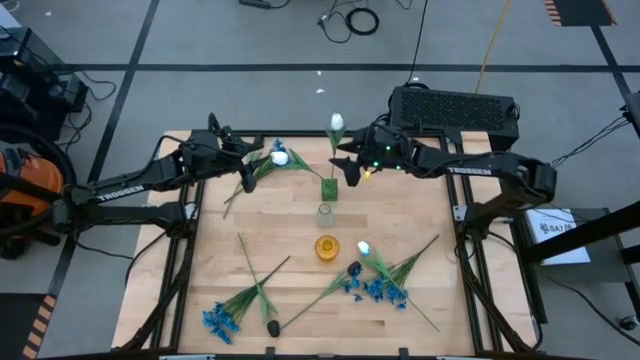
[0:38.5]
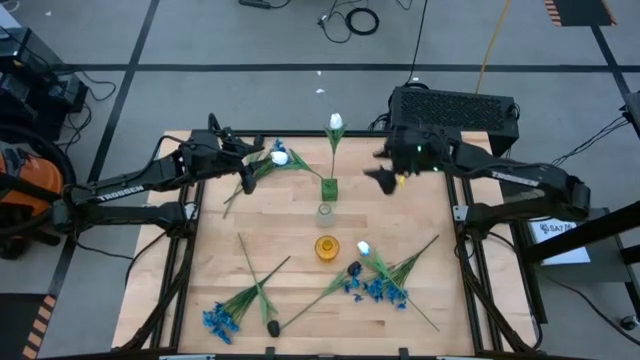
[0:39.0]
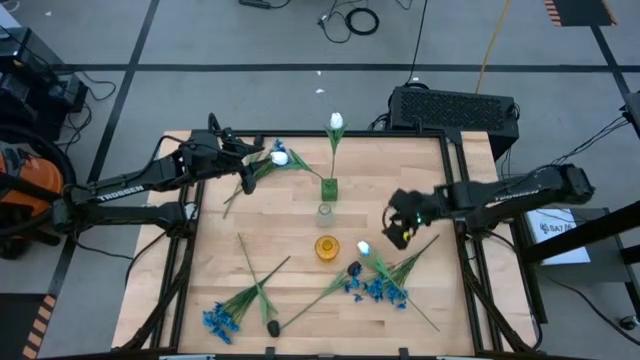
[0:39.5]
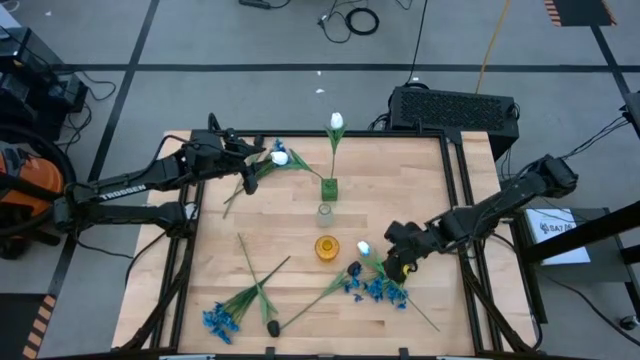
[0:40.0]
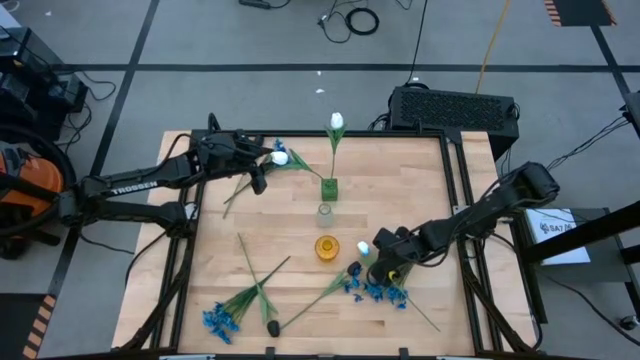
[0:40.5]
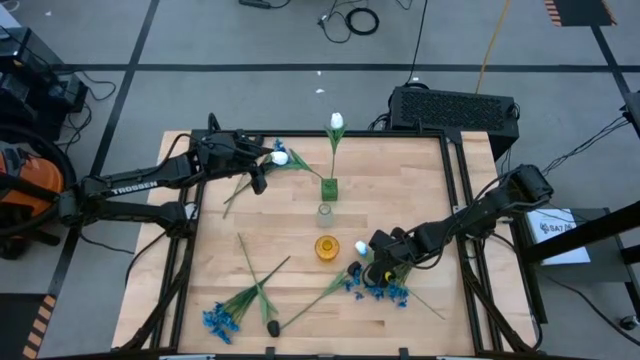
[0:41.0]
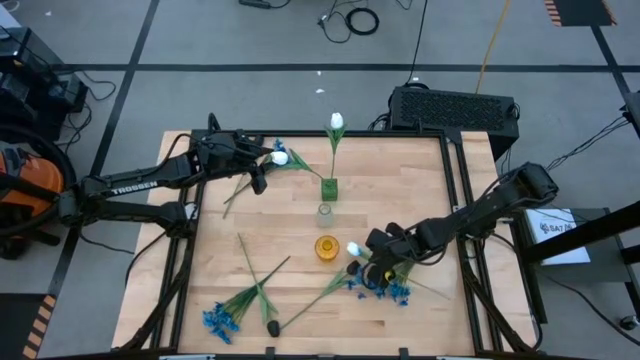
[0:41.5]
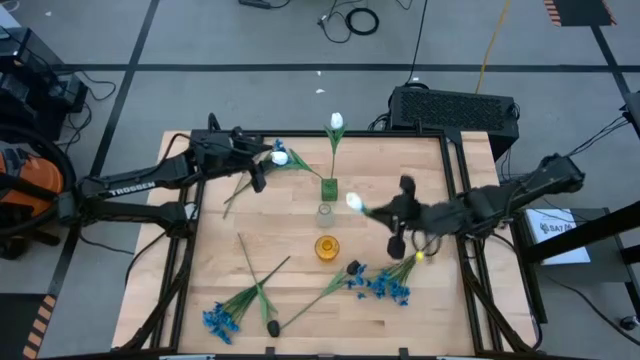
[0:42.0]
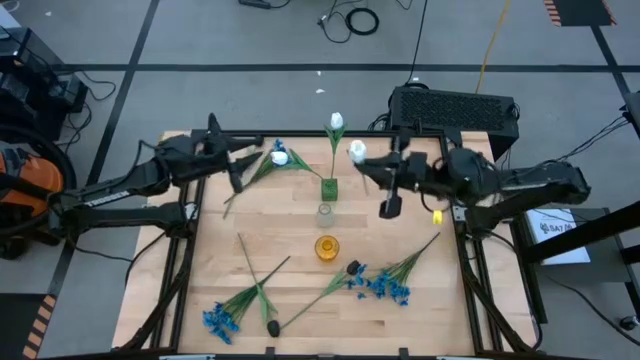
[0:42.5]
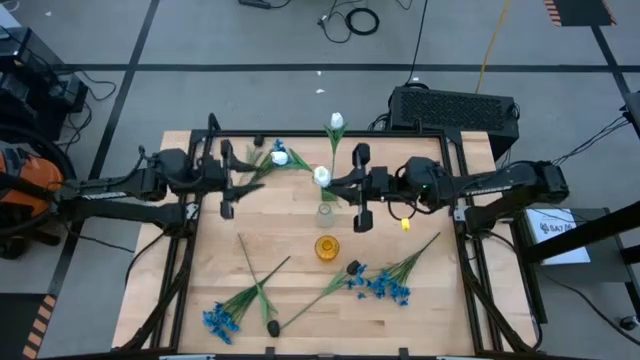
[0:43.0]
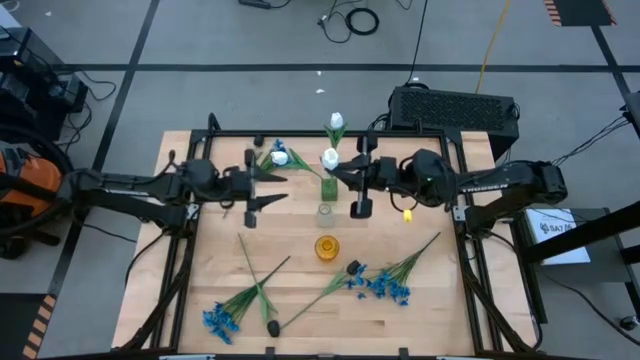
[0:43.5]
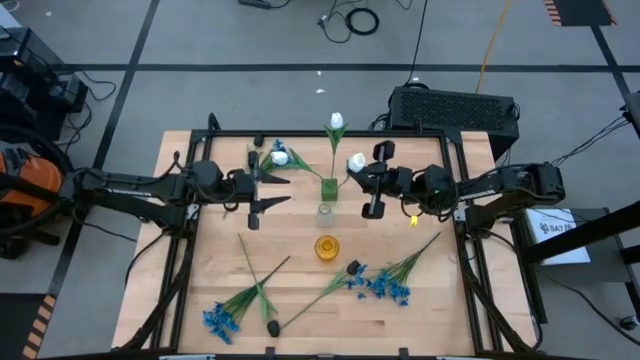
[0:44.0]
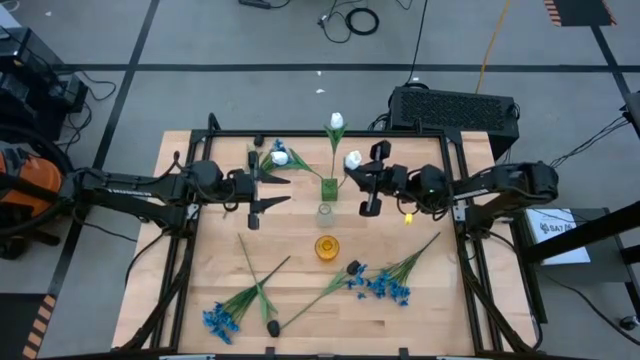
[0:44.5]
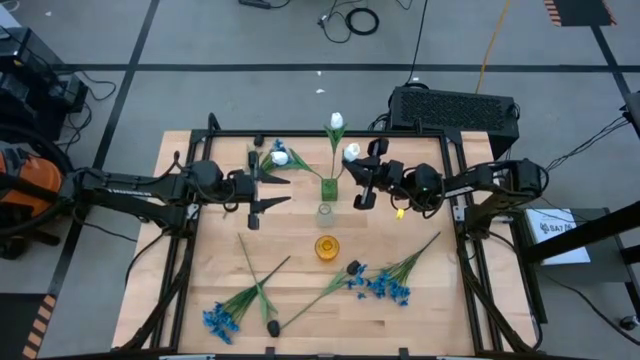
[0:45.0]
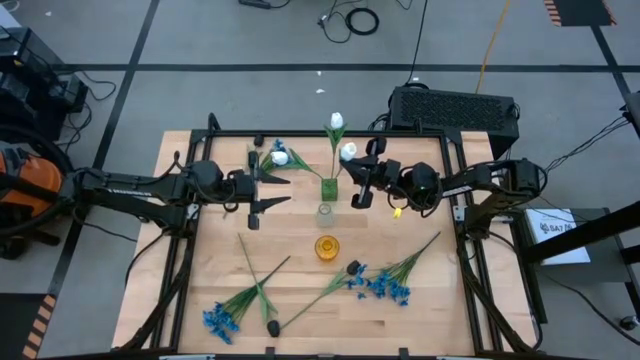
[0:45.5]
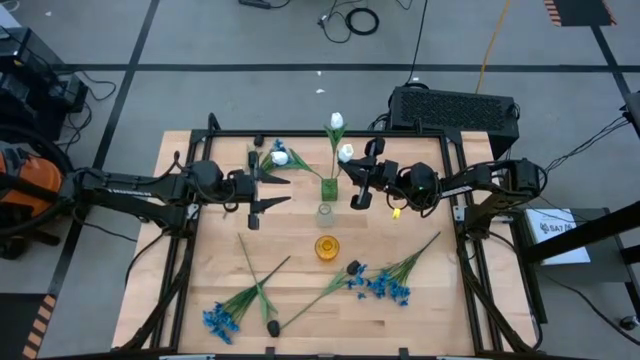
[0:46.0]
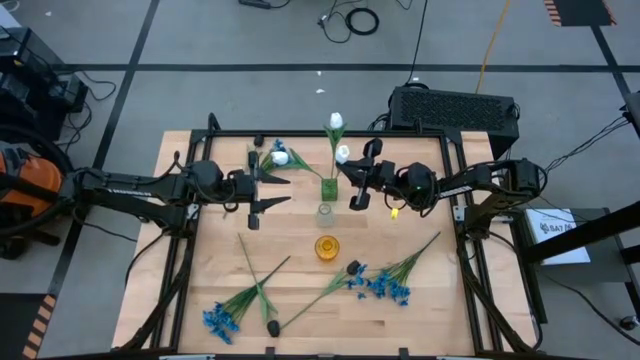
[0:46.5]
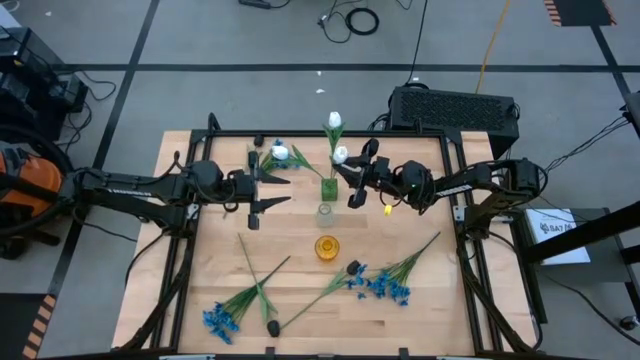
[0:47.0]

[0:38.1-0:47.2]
Task: Sort flowers into vase by color
Put the white flower into the green vase

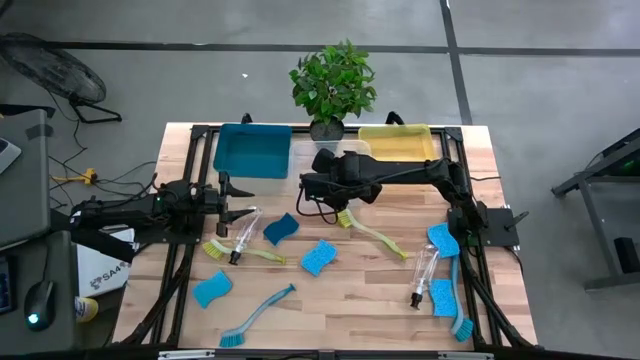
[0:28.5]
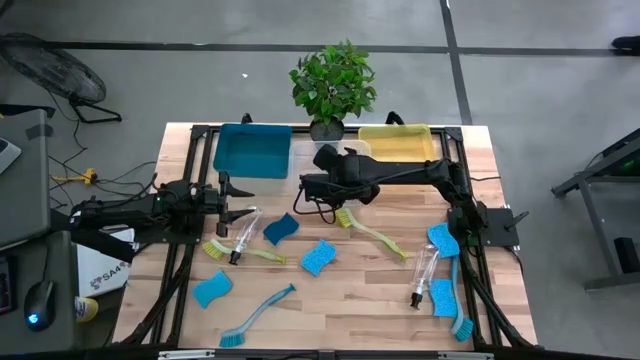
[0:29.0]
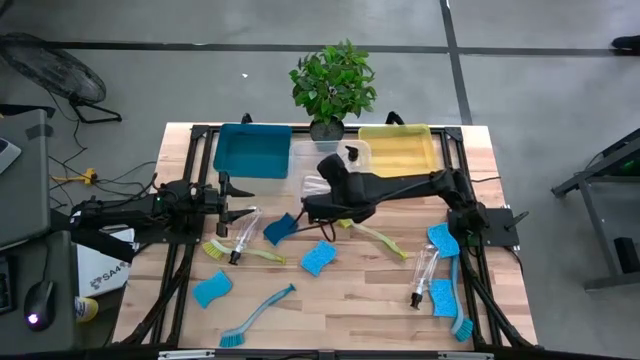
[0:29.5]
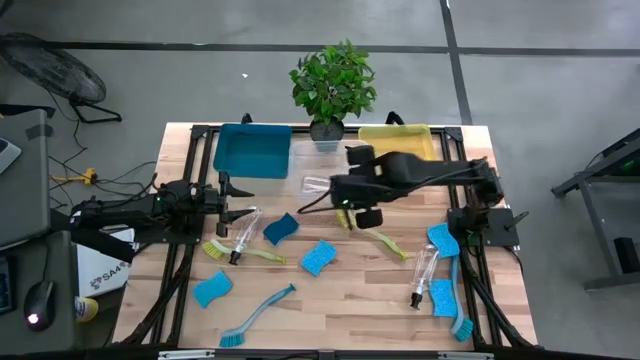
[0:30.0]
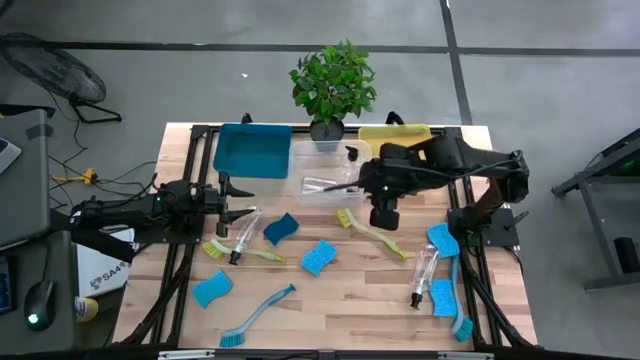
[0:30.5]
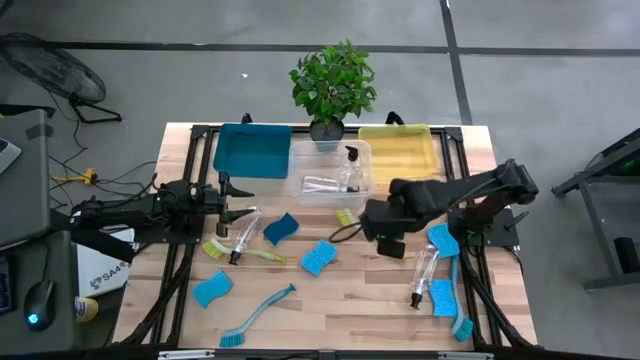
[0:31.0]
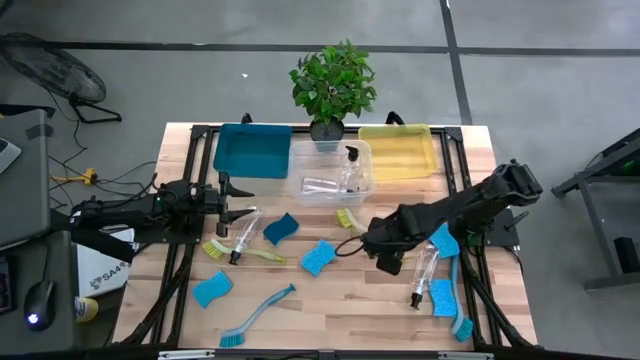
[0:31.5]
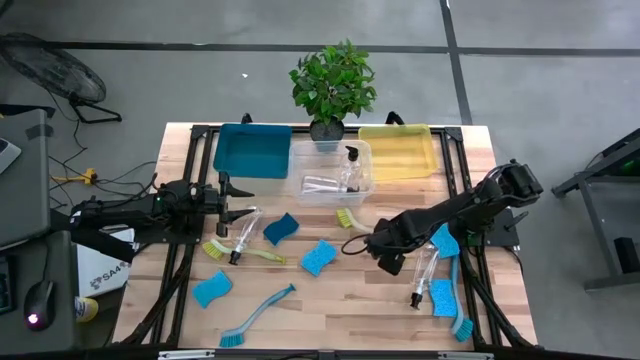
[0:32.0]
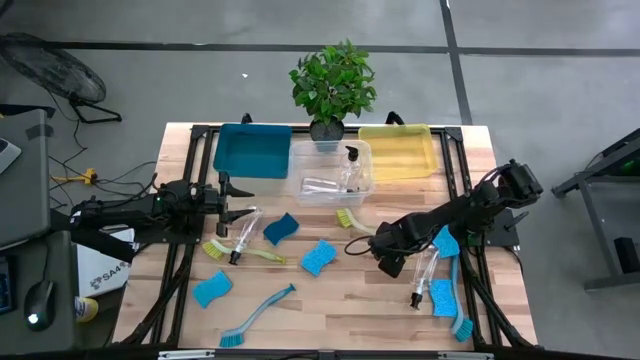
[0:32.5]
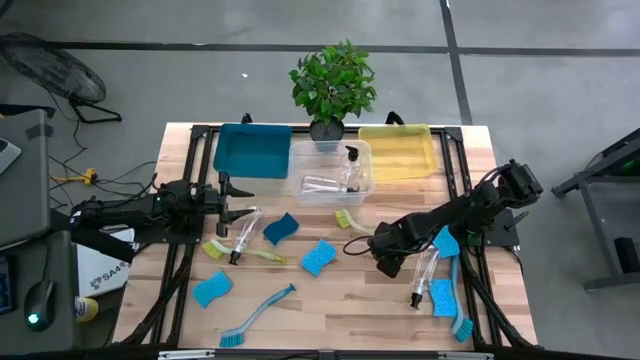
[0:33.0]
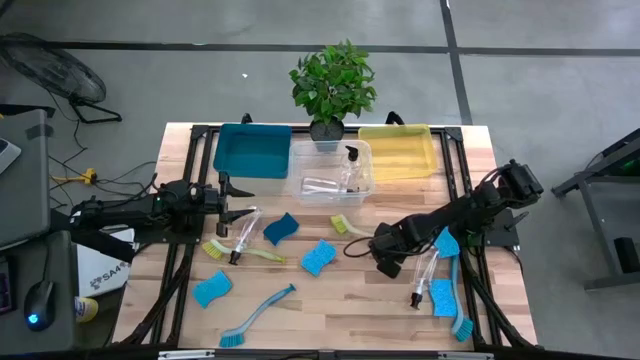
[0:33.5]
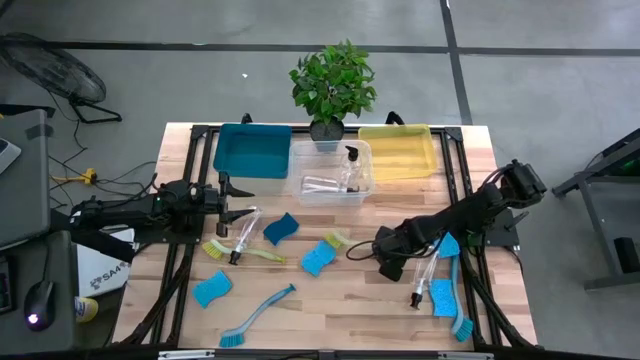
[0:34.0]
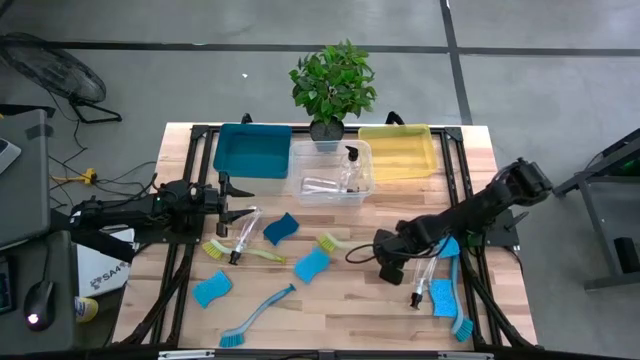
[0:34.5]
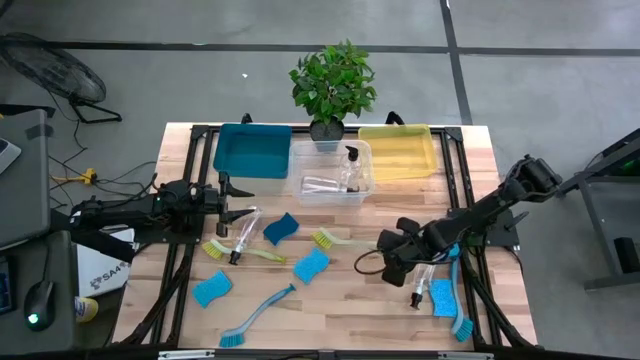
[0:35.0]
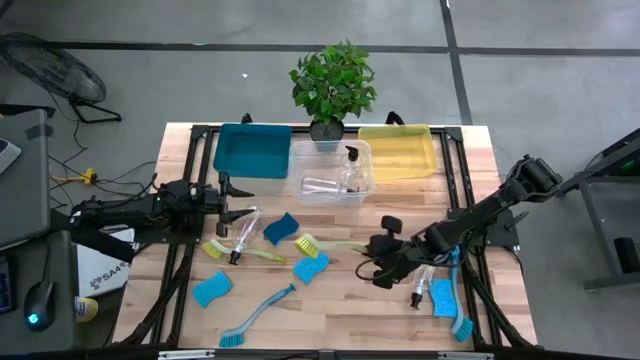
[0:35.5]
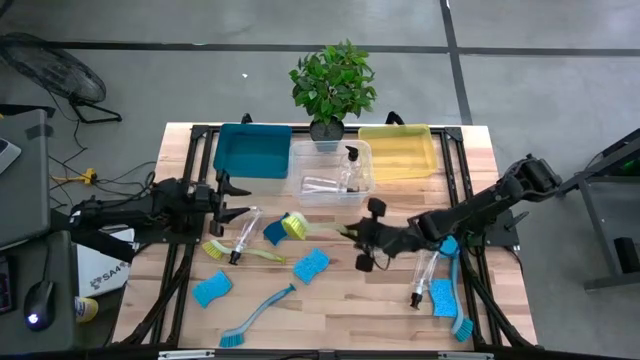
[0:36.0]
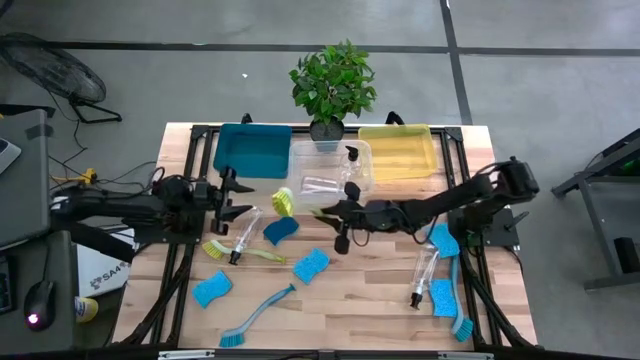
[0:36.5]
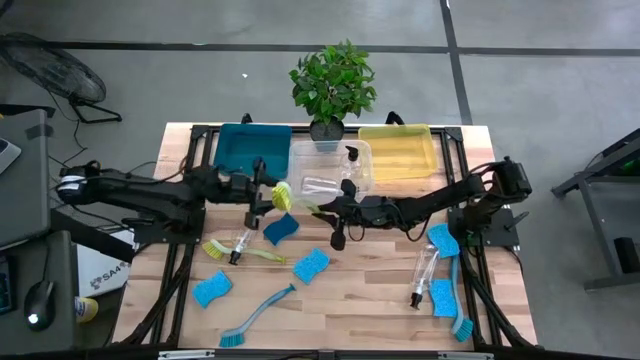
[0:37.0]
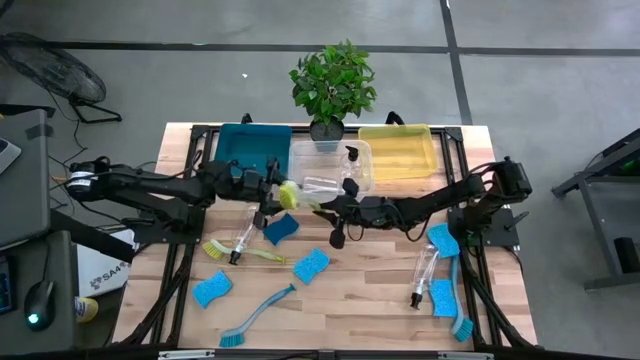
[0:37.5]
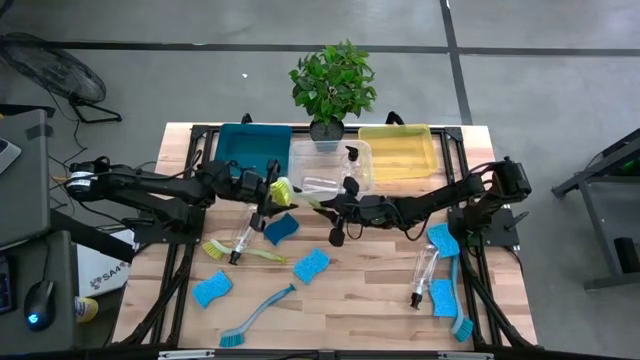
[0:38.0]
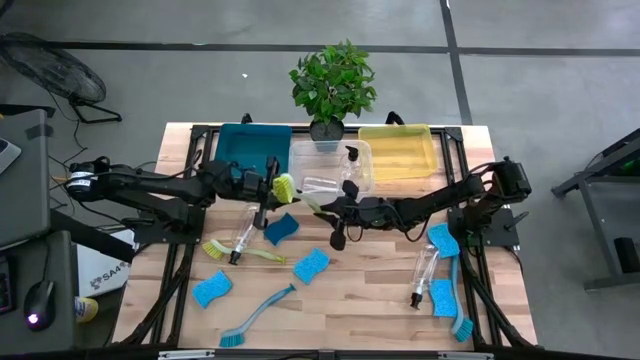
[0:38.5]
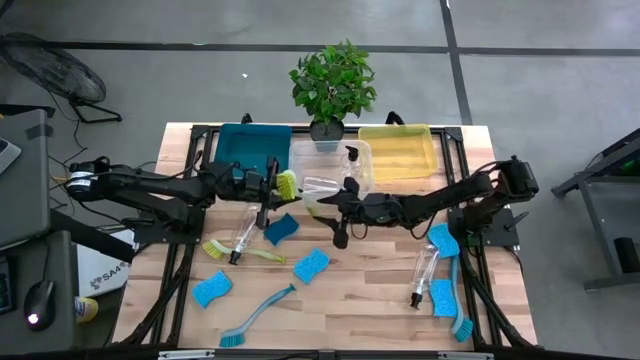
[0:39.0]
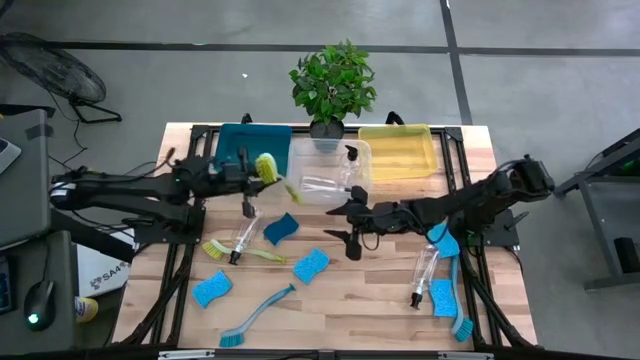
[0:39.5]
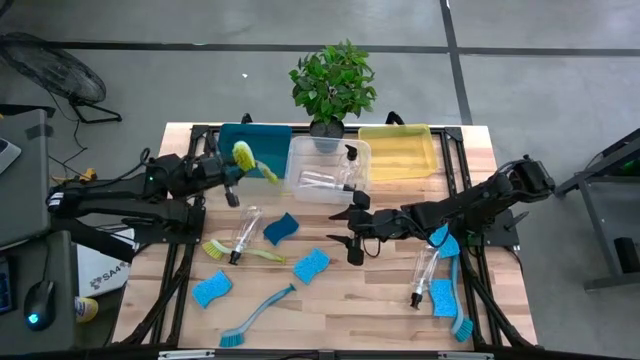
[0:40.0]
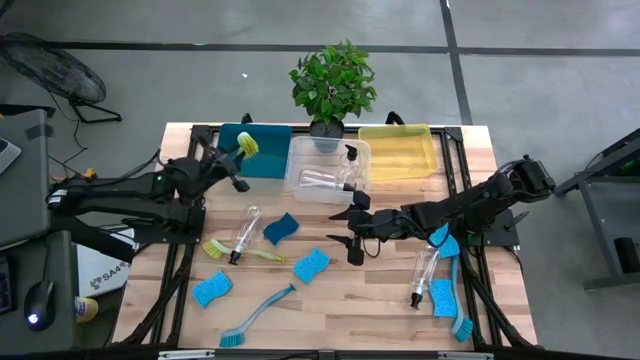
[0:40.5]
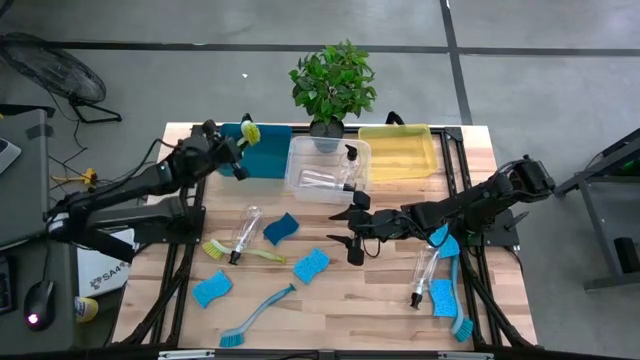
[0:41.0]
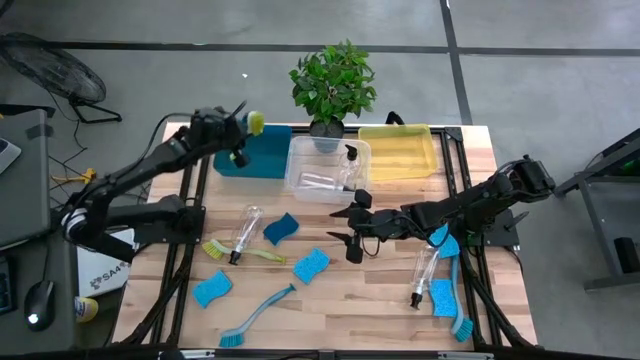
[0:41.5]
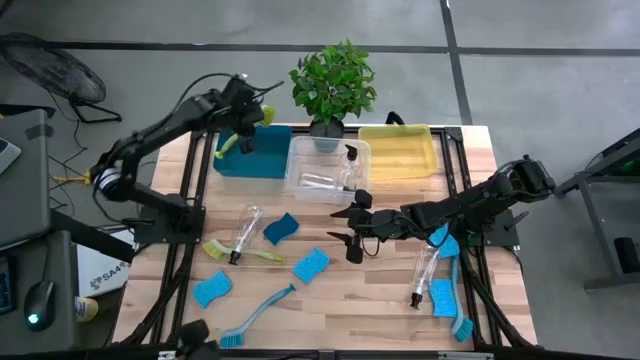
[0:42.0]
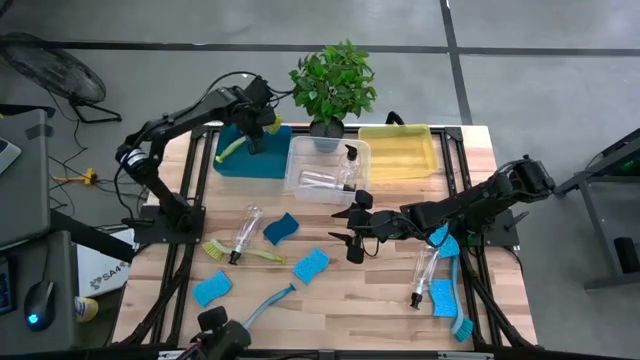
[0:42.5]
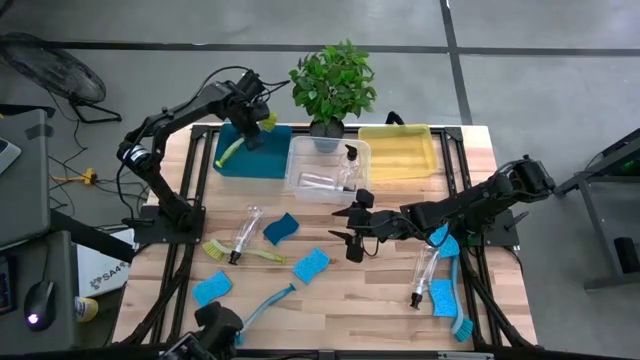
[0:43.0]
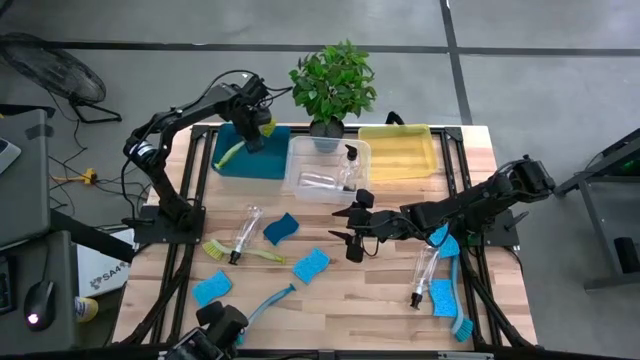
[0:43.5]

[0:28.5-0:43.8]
Task: Pick & Place Kitchen Sink Supplies
Put the light green dish brush into the blue bin
